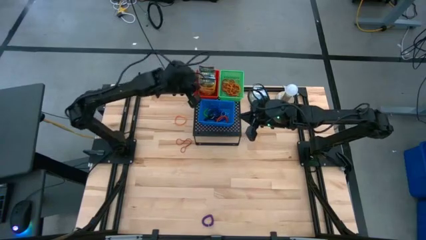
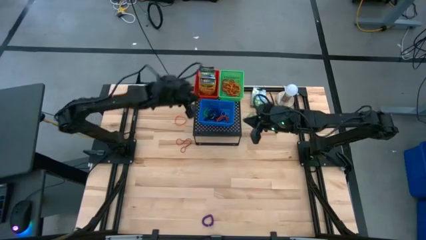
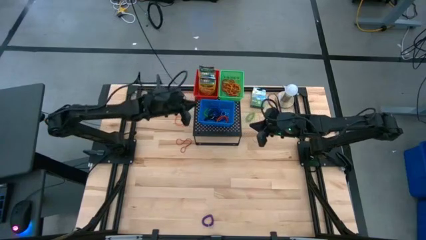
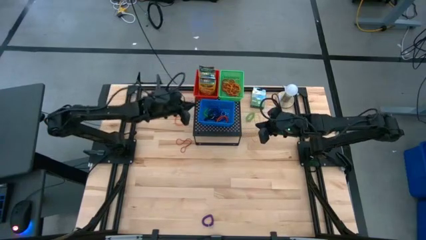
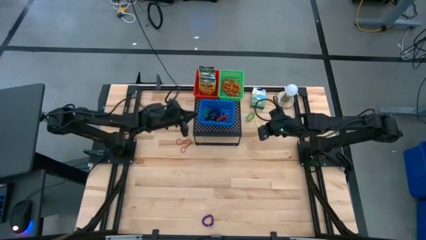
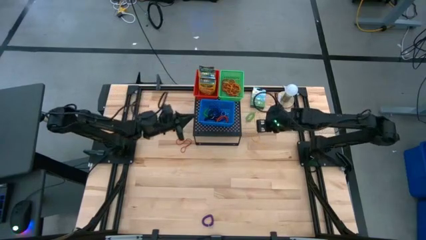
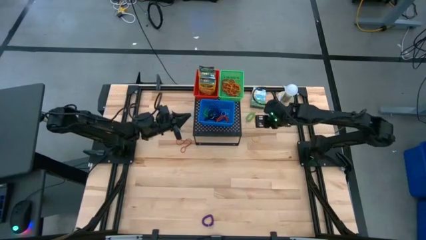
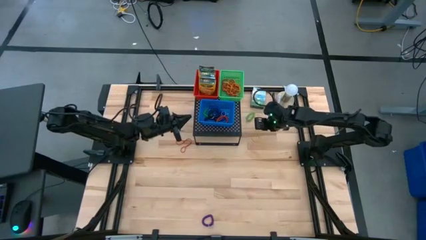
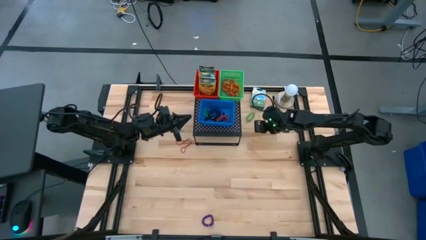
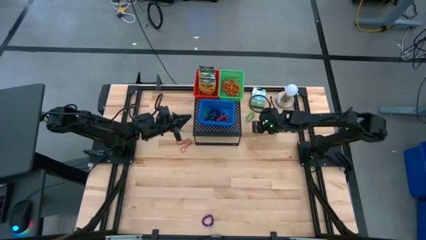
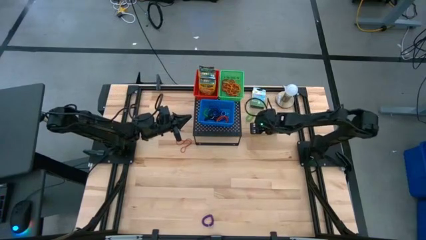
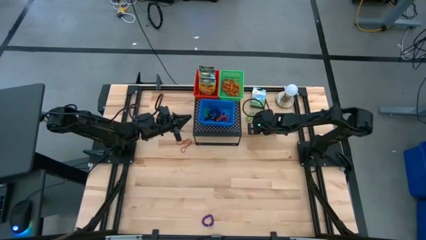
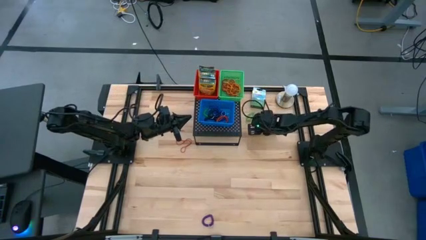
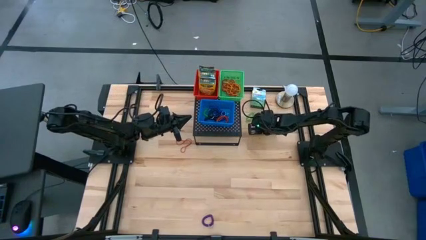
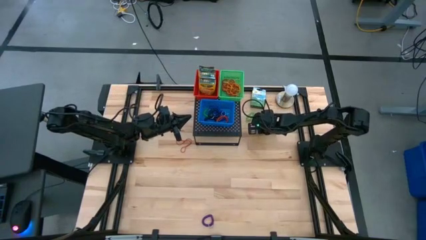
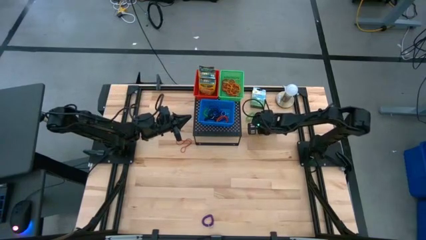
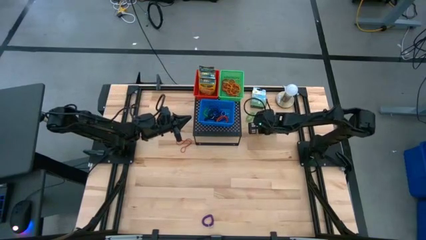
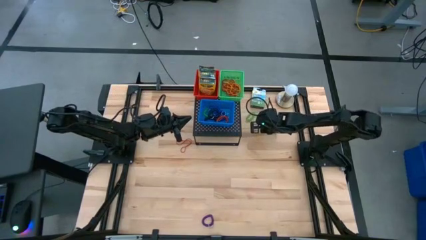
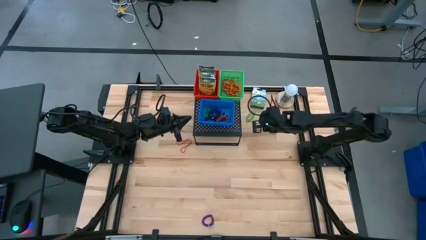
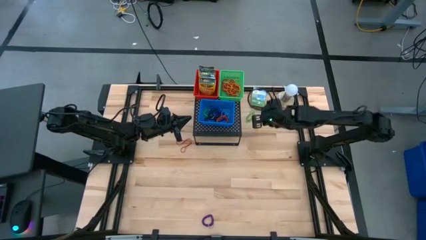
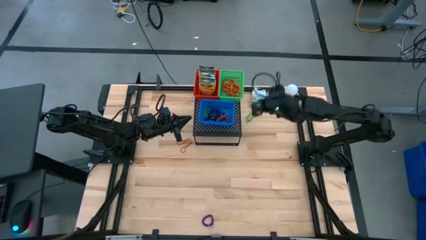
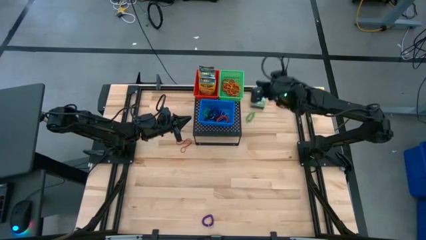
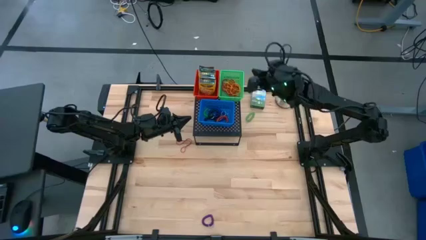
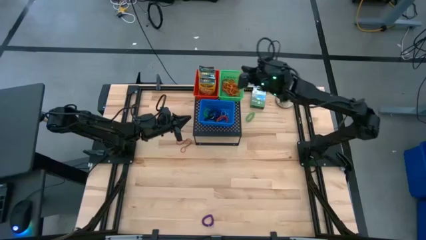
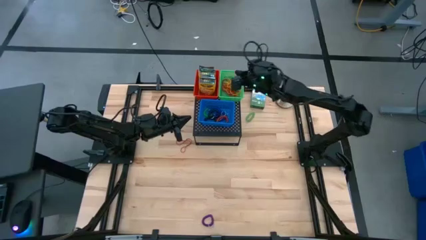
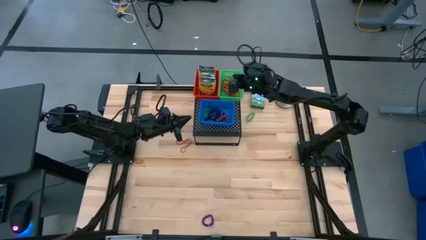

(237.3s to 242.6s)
Task: Pick & Place Office Desk Supplies
Put the yellow rubber band into the green bin on the shelf

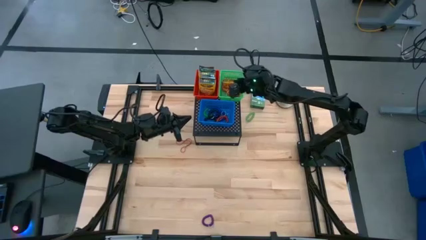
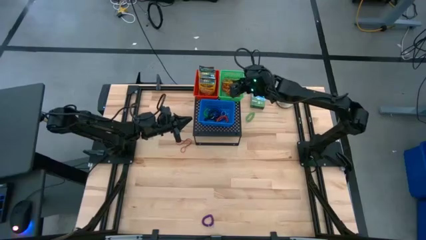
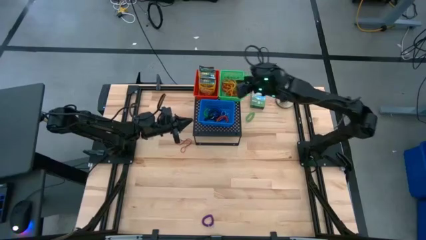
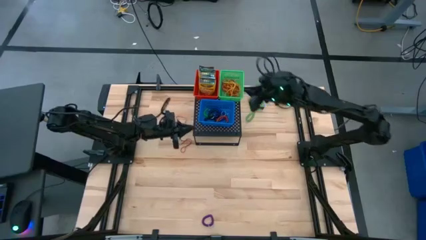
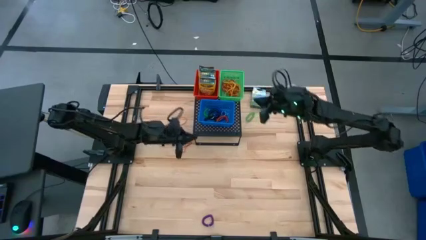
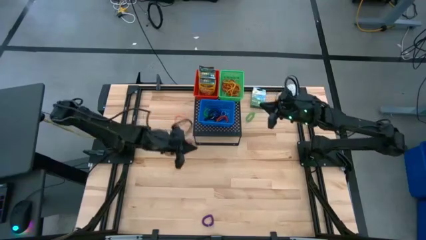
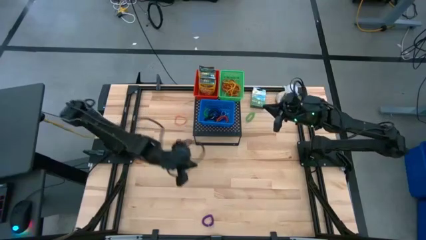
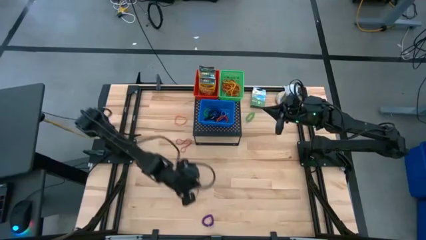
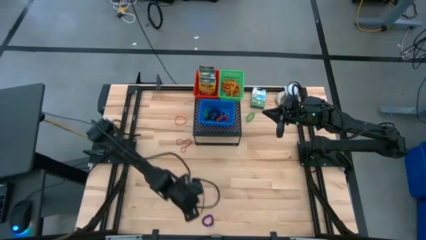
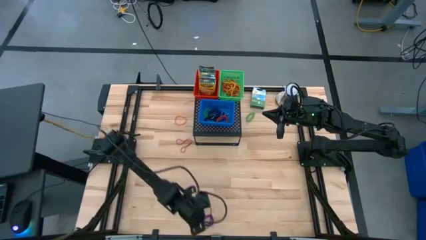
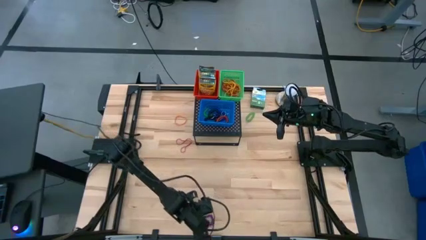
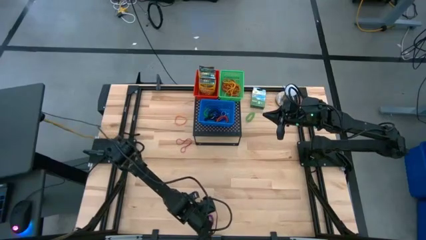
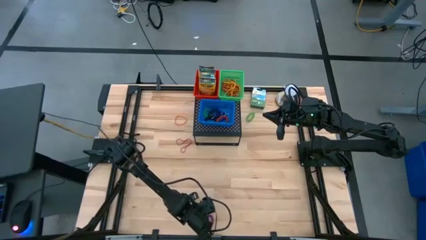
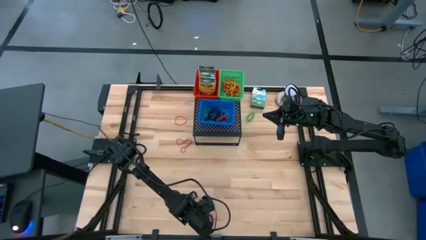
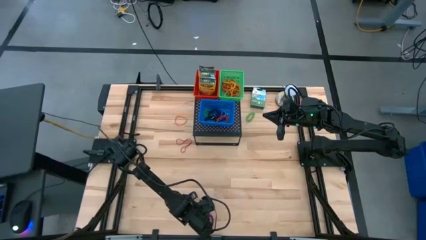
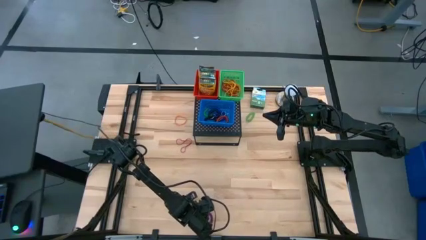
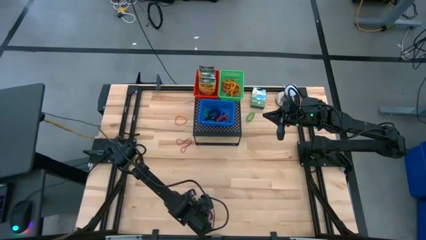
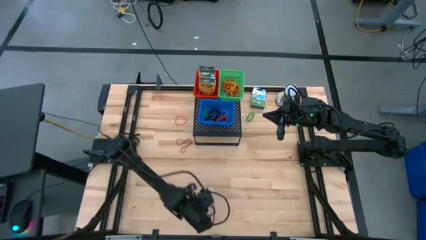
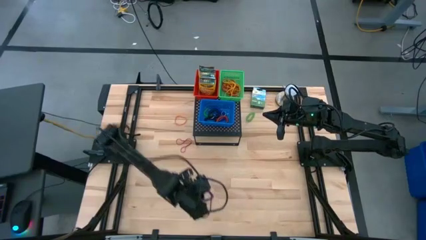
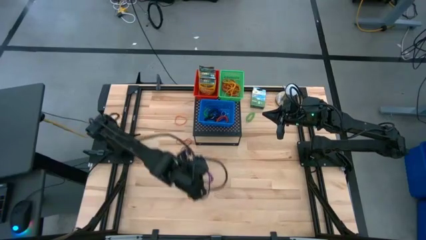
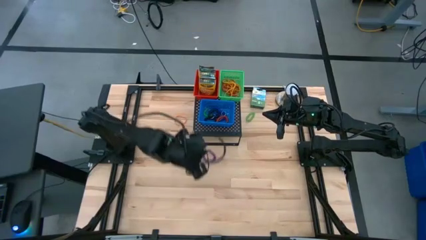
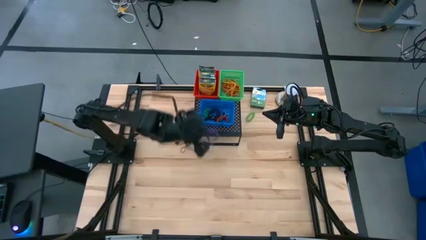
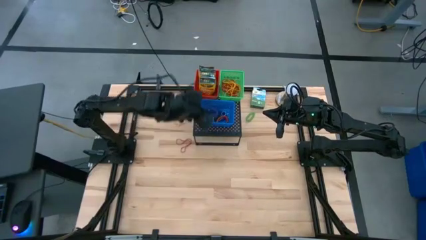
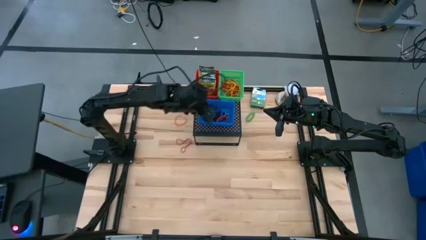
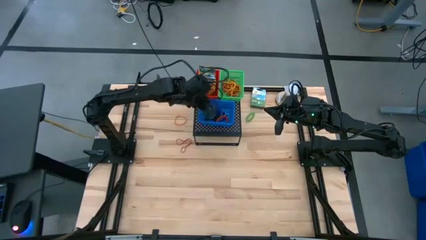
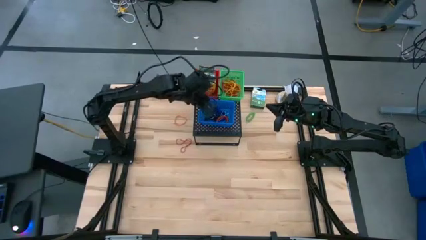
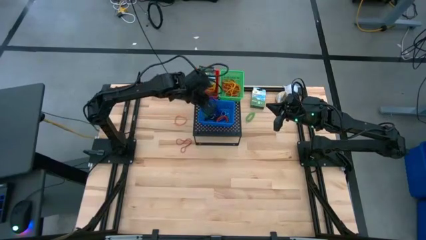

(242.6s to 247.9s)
Put the purple spring keychain into the blue bin on the shelf

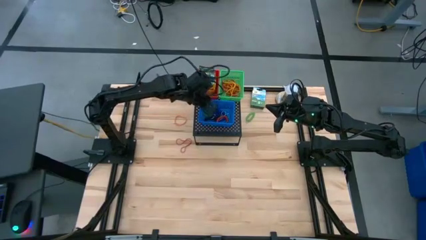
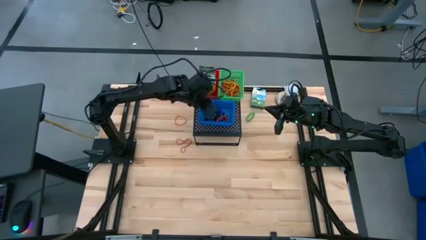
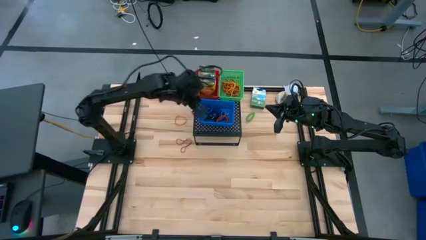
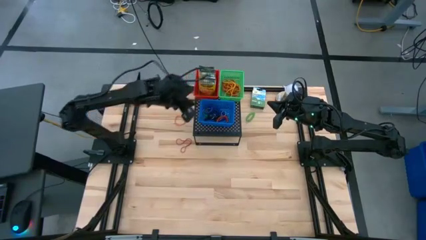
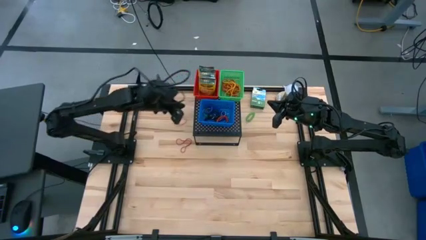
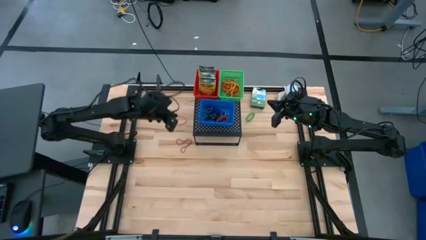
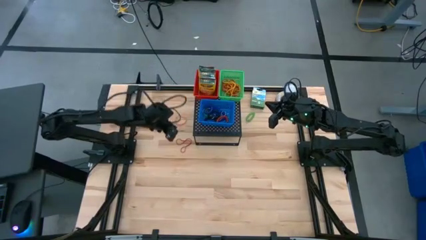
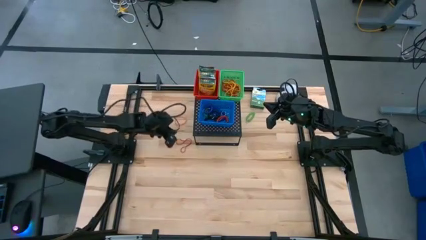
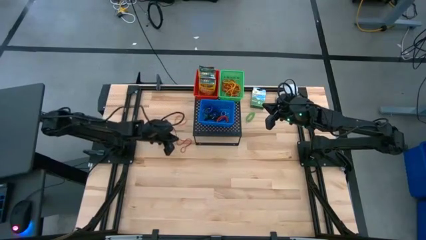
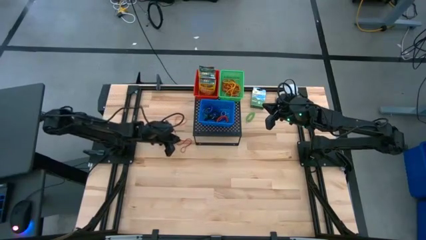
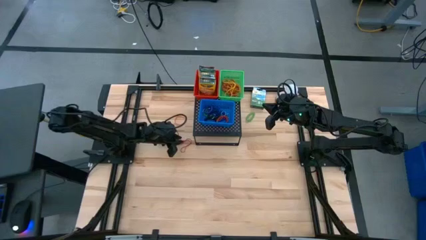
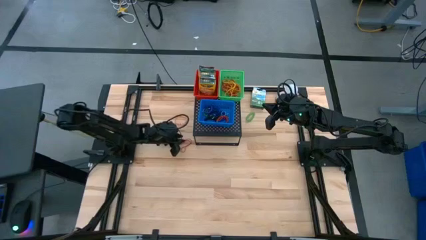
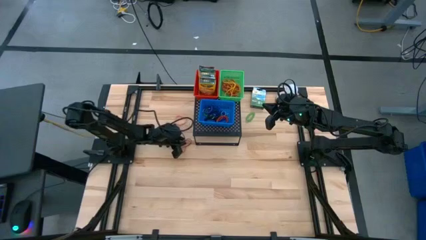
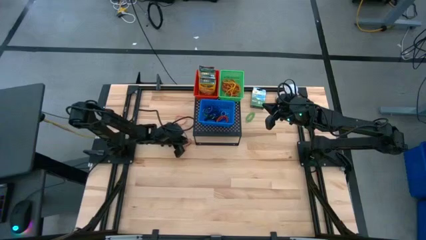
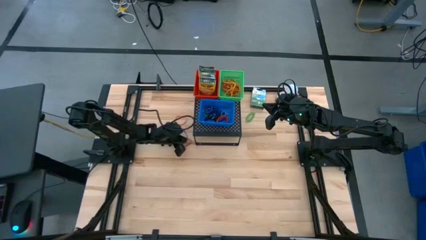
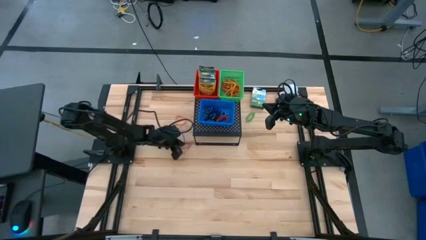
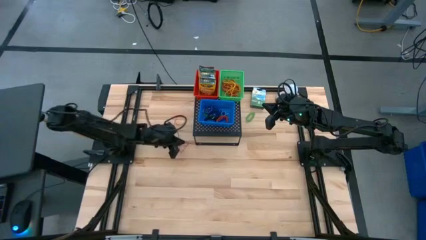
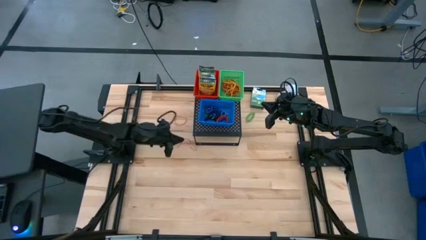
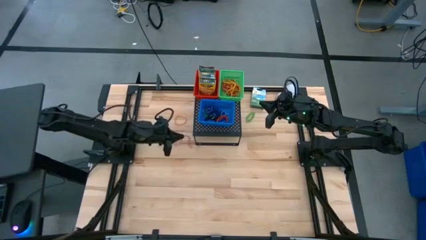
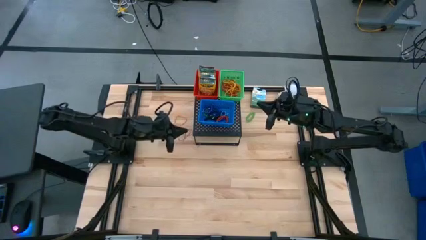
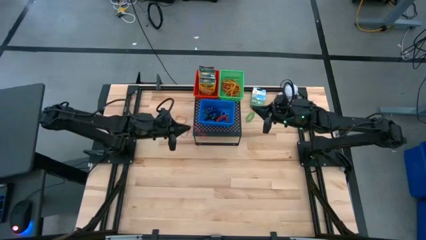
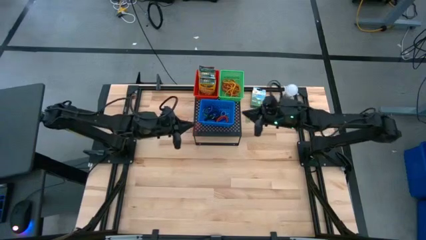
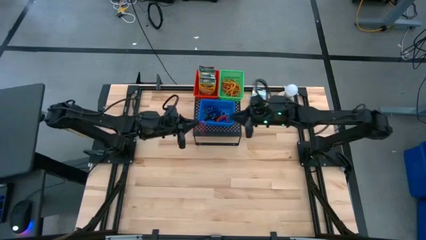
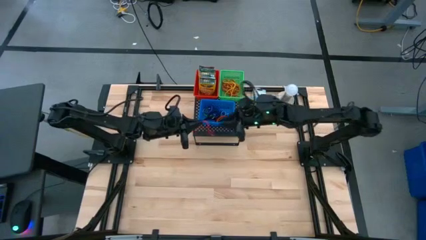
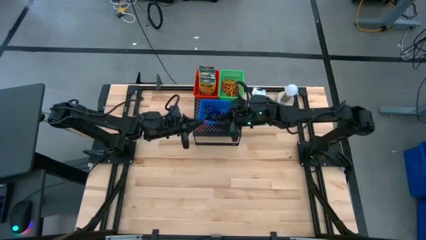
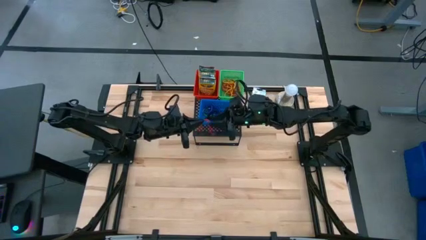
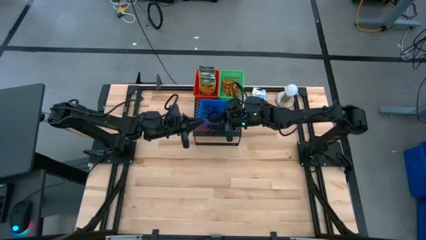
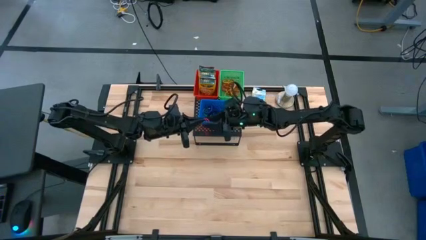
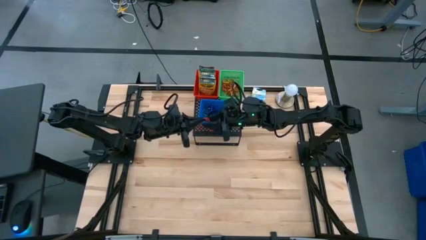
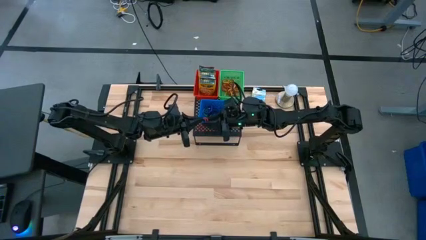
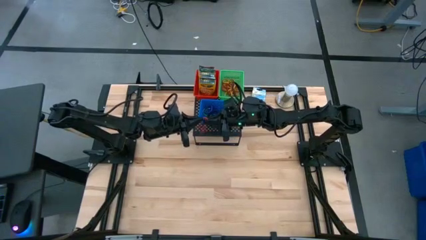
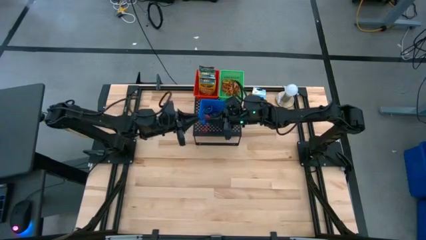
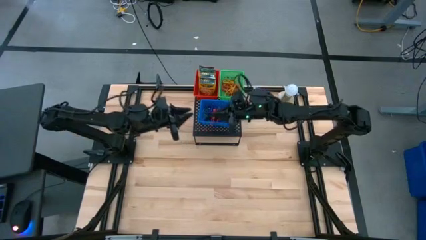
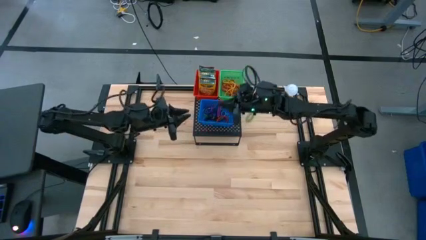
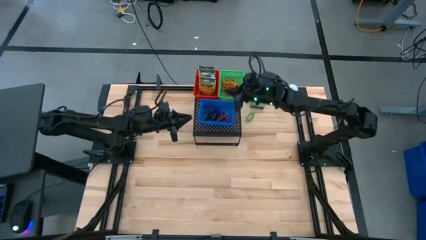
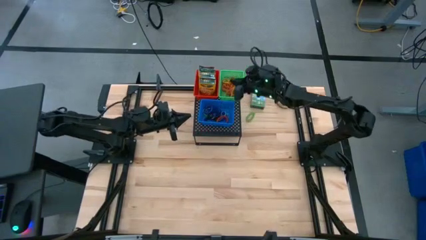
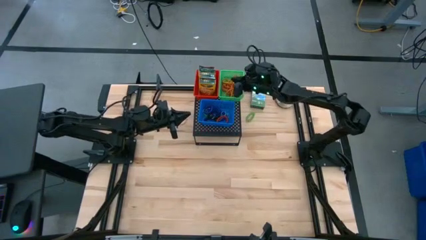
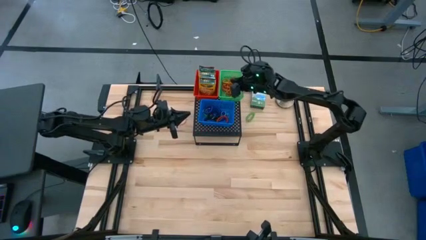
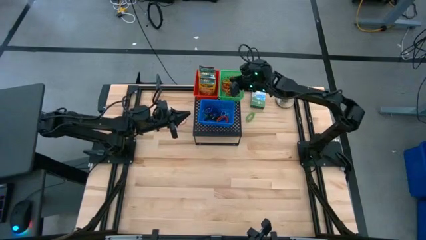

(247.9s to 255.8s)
Put the red rubber band into the green bin on the shelf
